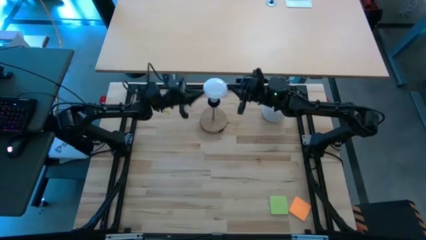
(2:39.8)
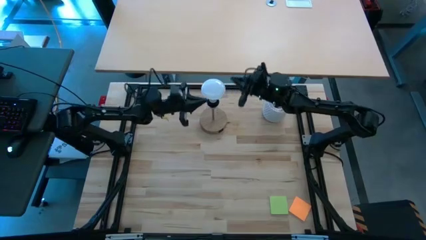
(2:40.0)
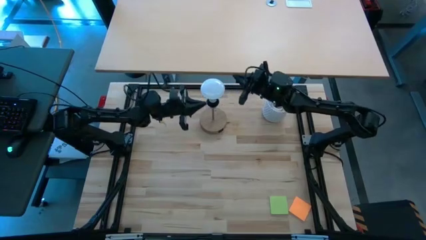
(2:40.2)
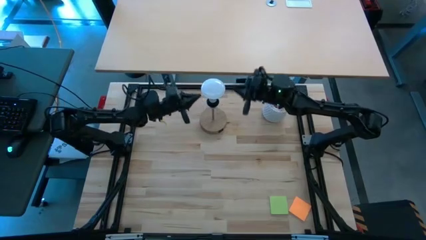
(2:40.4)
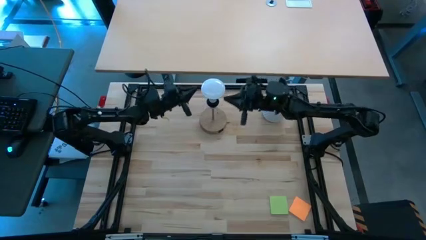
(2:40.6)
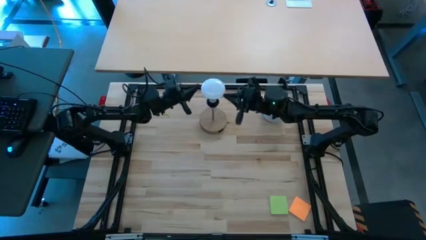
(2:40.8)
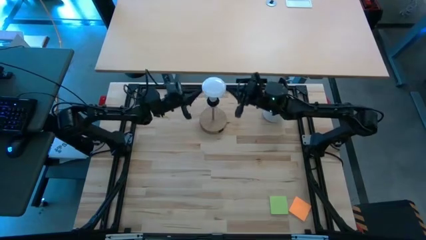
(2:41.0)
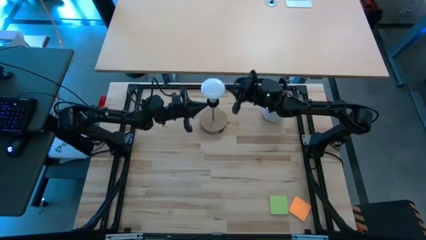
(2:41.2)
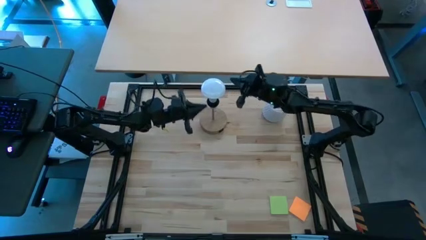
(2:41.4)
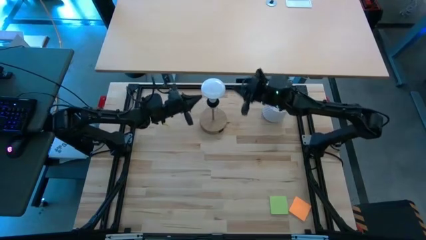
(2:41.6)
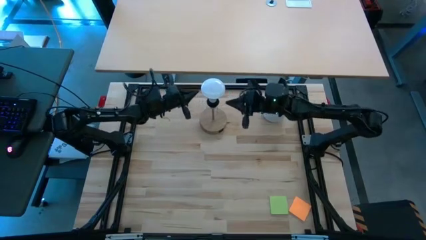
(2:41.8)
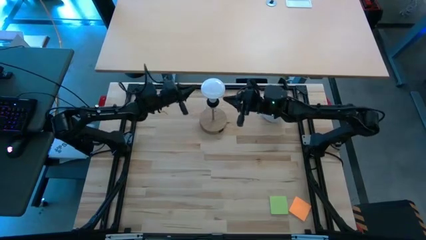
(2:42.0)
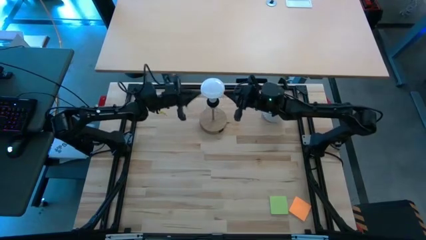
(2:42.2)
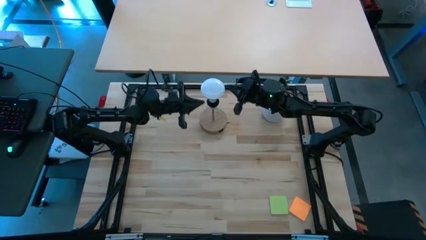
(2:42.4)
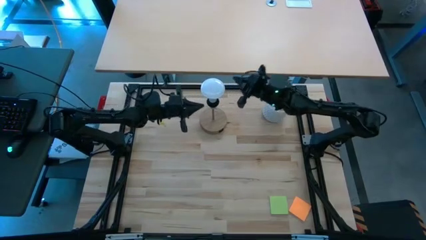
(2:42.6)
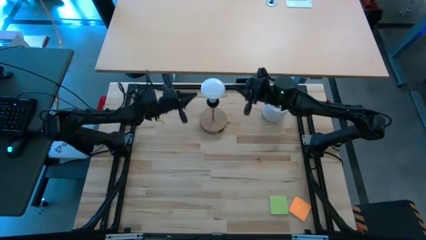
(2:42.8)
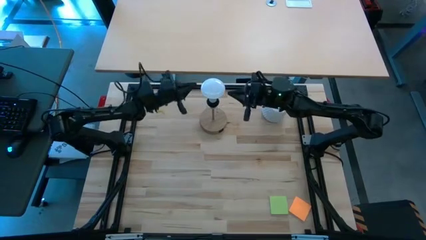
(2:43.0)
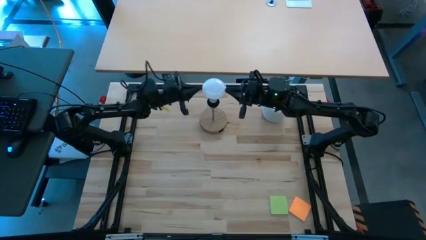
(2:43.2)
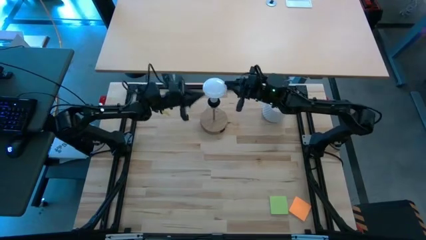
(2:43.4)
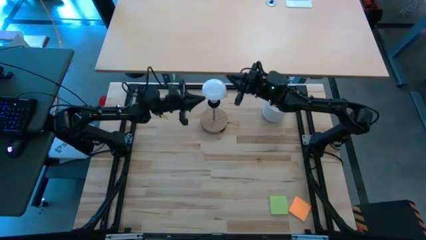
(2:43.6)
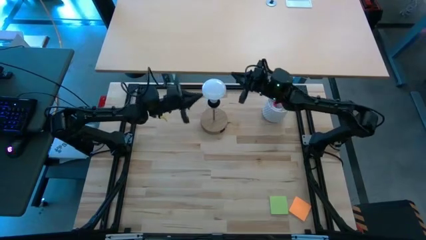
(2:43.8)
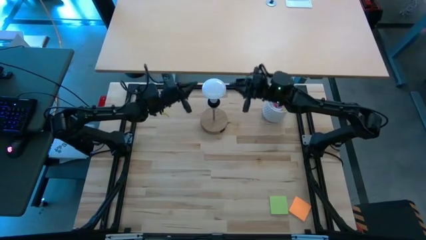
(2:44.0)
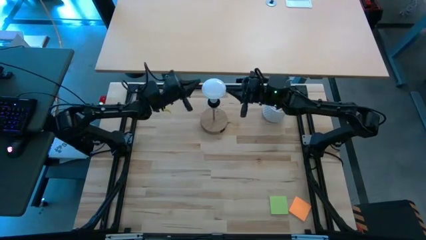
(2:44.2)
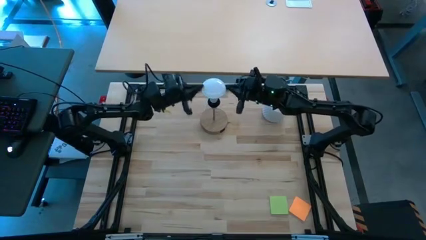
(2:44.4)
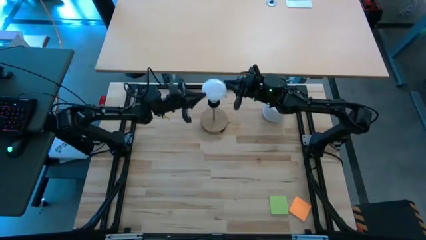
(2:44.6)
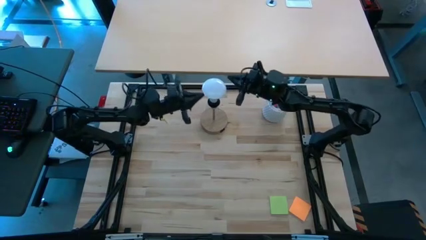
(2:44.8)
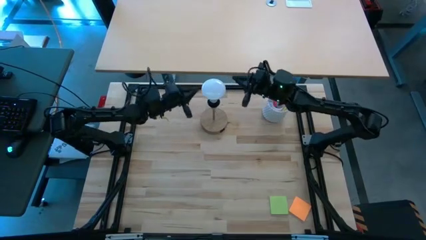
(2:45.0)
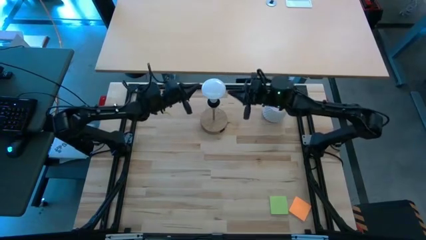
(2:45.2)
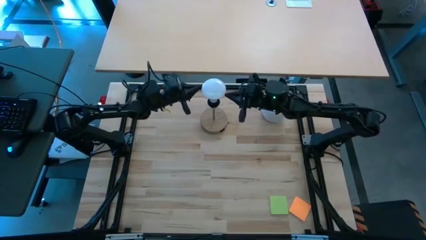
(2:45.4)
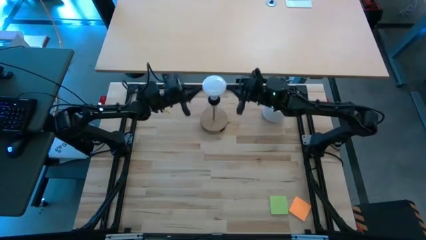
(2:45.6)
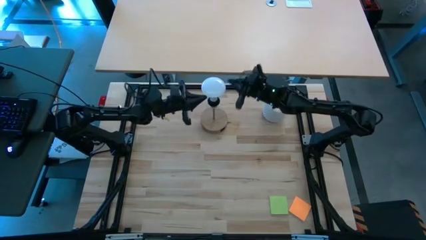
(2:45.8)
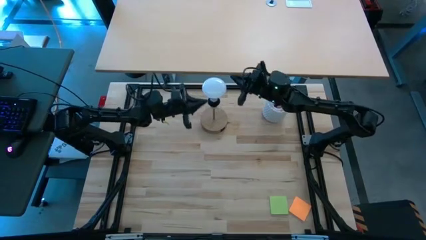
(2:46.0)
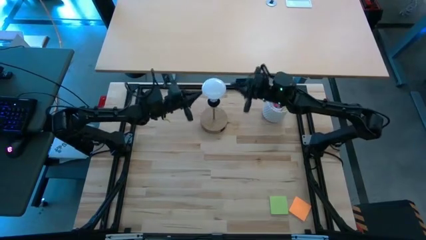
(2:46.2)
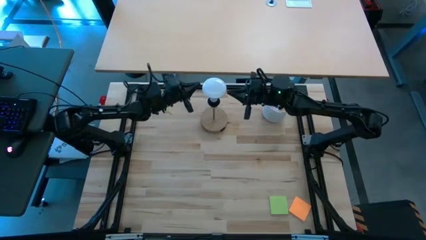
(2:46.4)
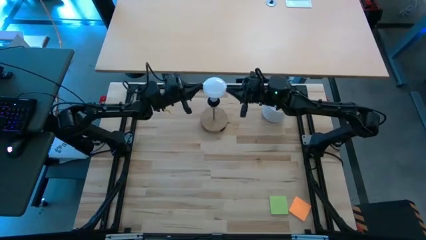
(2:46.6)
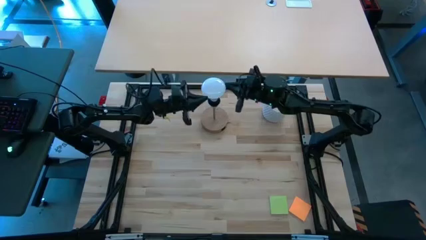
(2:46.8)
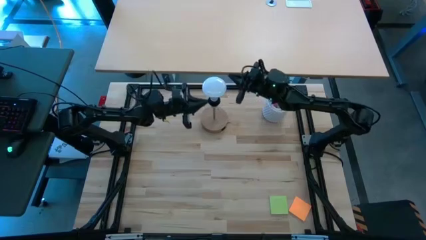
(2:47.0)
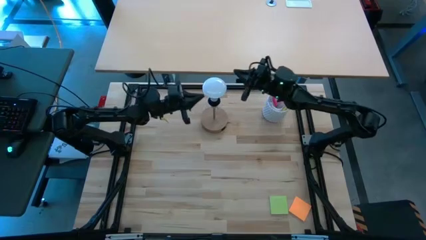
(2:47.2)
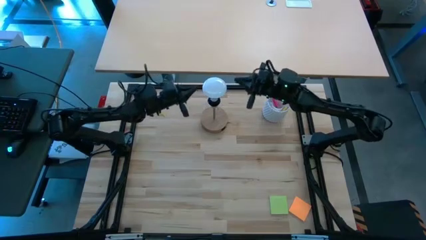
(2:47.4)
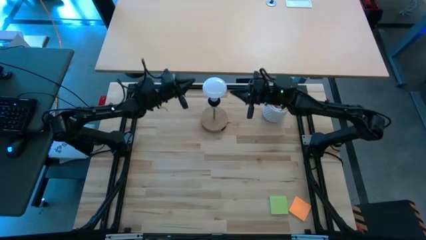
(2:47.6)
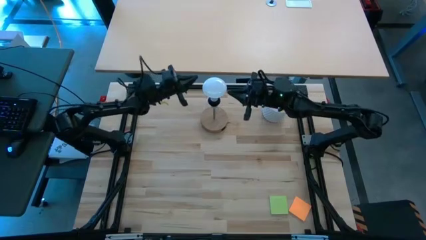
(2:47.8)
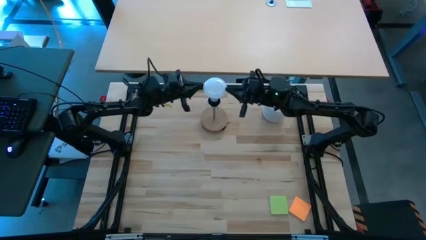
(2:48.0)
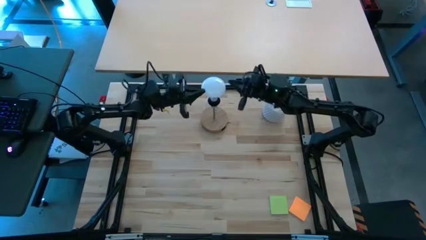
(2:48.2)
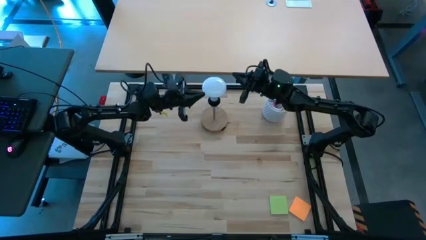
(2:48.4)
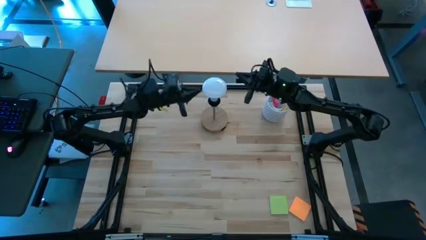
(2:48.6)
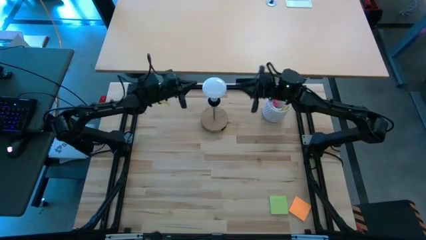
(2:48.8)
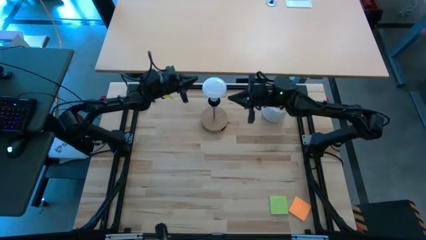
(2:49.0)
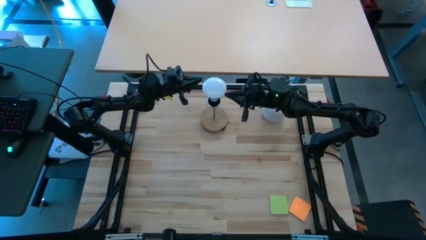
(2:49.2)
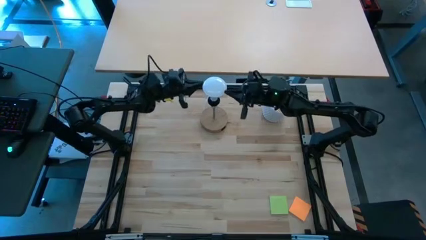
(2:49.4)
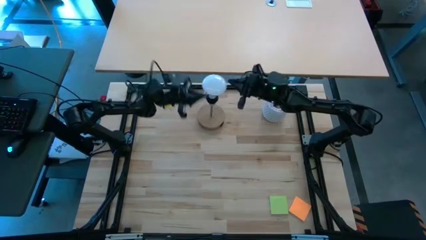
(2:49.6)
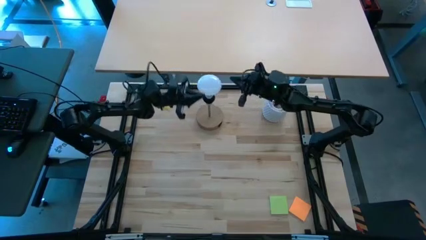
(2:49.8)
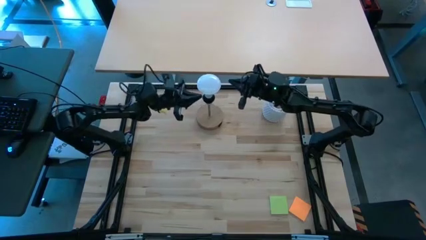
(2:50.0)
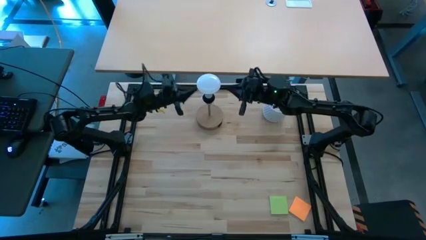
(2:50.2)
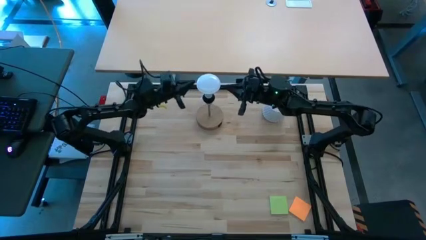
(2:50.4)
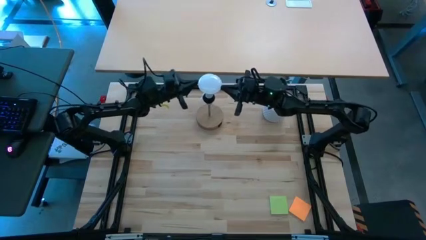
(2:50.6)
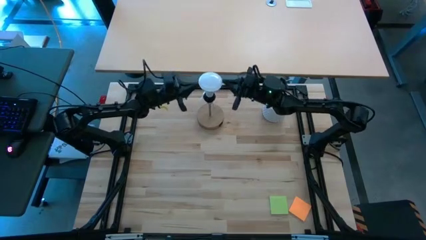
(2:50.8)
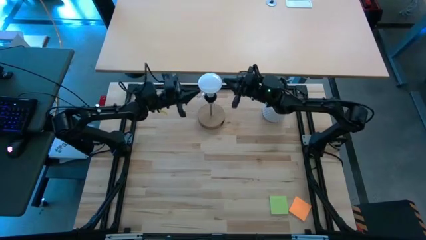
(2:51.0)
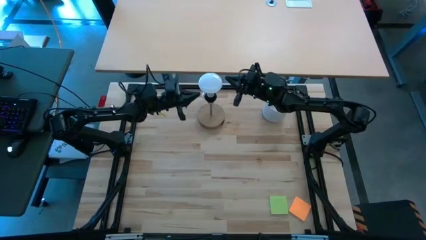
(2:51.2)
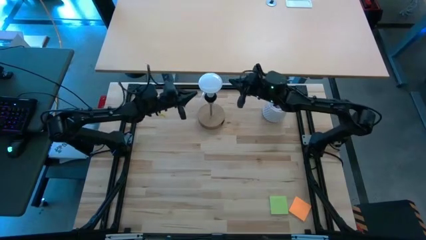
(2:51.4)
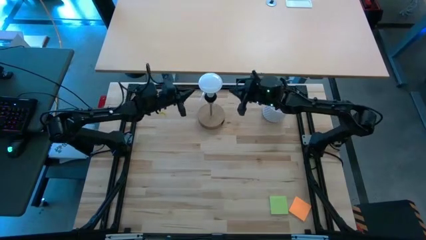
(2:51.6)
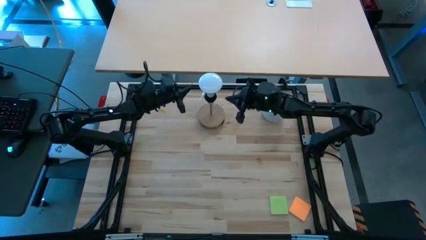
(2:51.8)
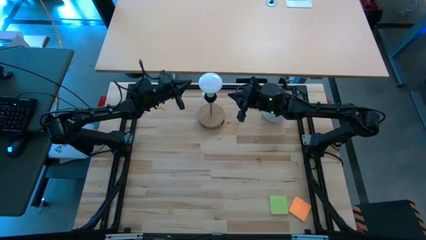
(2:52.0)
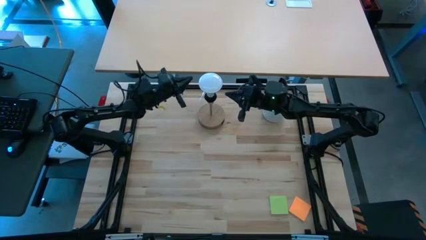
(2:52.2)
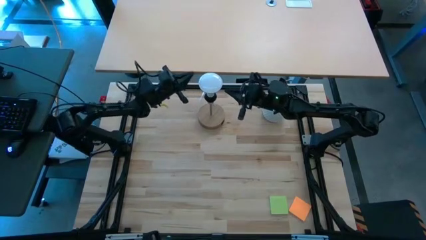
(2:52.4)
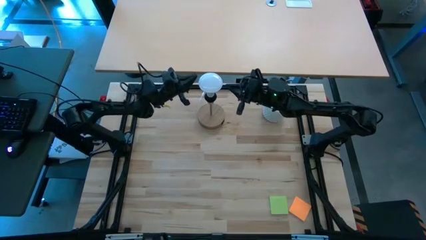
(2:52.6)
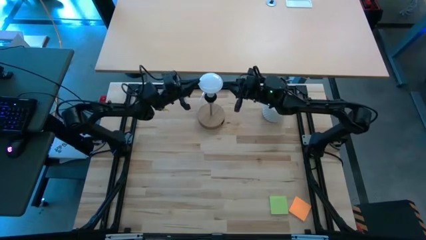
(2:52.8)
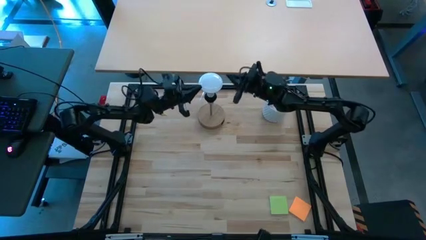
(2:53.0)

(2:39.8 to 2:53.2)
Task: Screw lightbulb
Remove the white lightbulb from the desk lamp

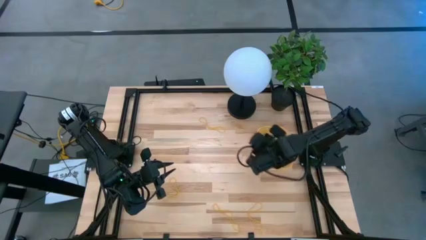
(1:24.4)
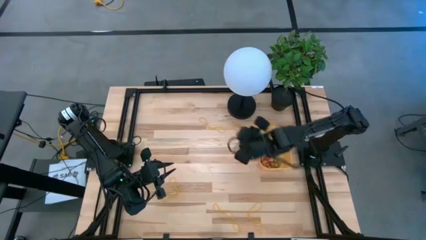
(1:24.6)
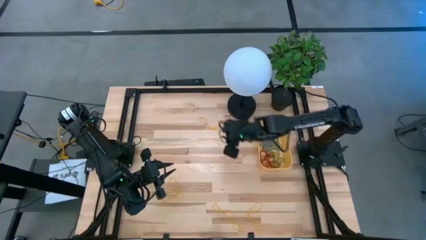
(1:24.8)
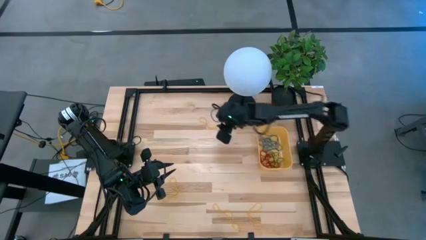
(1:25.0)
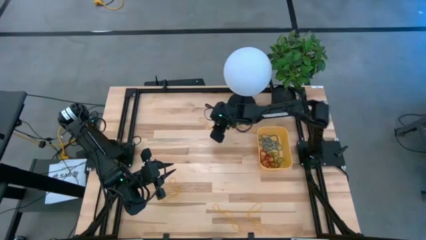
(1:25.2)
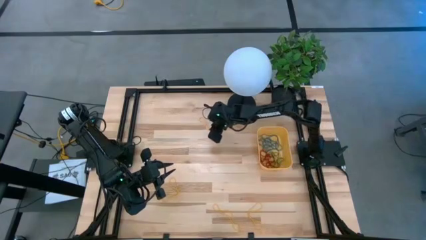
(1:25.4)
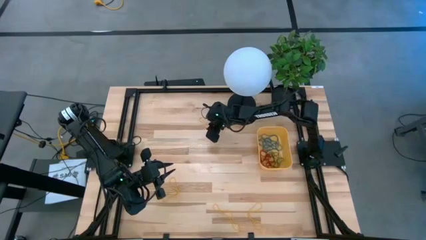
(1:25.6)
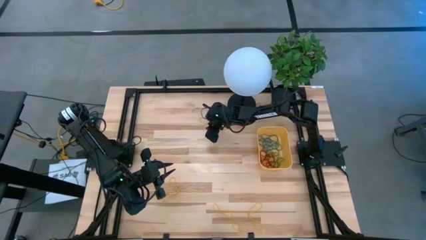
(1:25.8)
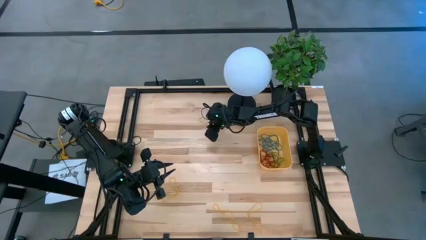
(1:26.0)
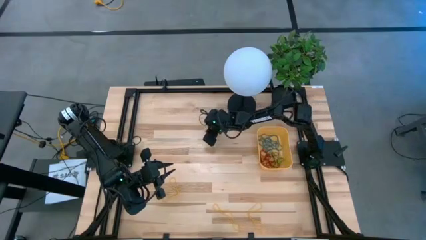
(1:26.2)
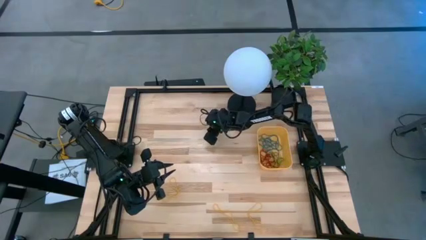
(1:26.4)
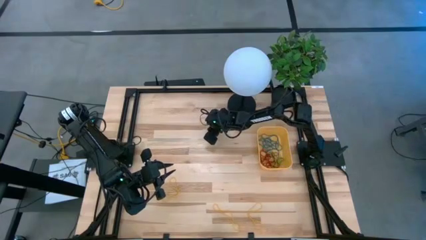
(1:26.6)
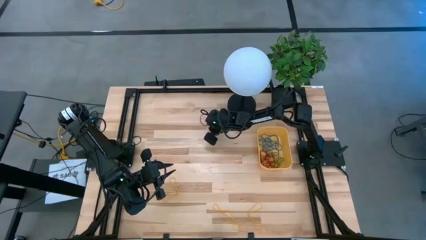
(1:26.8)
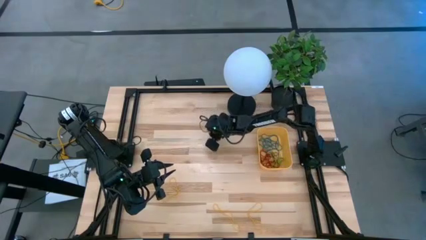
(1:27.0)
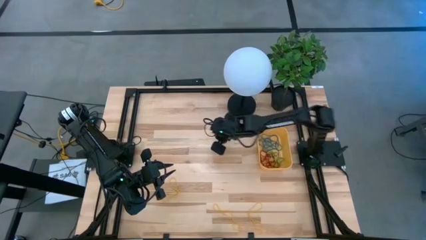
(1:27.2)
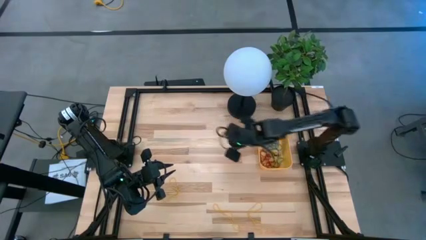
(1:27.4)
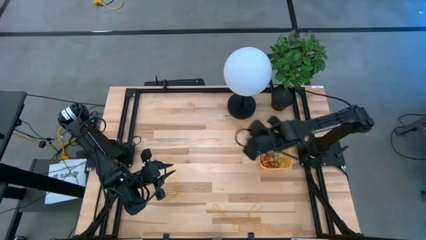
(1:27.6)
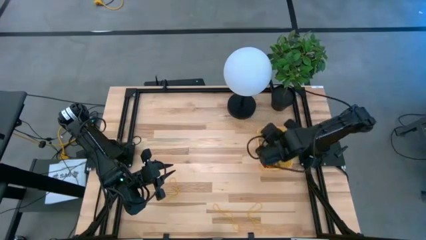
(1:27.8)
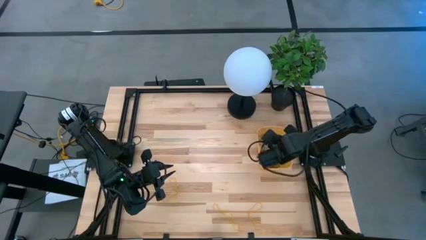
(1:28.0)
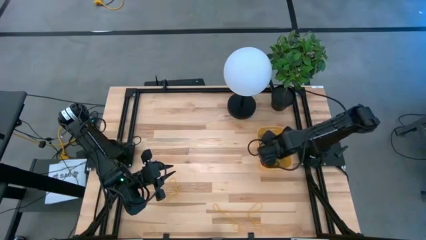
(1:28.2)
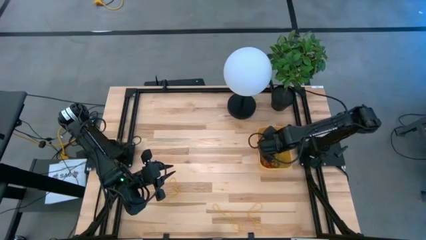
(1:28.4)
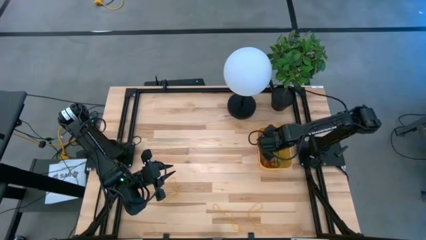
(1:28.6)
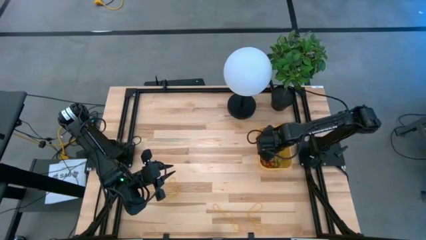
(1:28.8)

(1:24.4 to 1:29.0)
Task: Pick and place items into bin
Put the yellow rubber band into the bin
